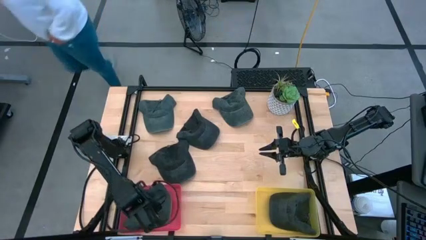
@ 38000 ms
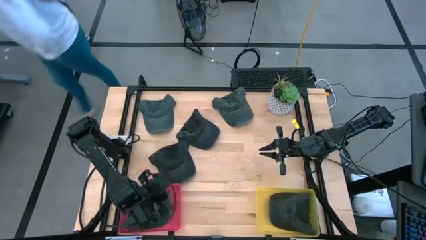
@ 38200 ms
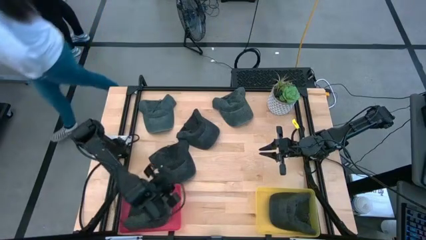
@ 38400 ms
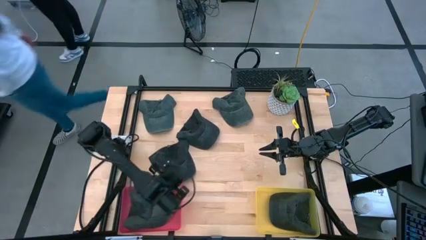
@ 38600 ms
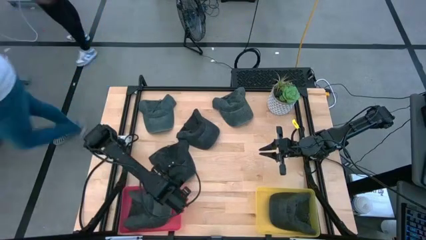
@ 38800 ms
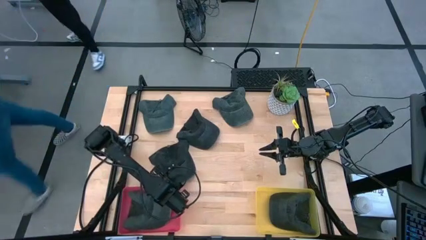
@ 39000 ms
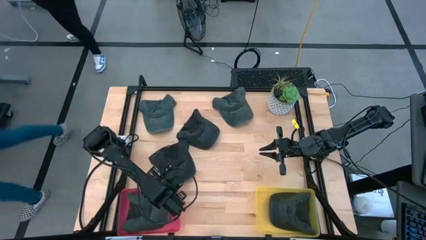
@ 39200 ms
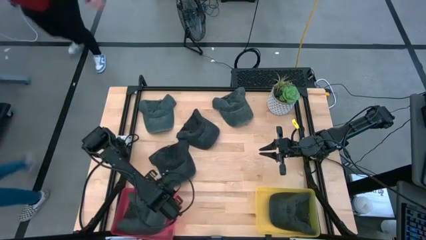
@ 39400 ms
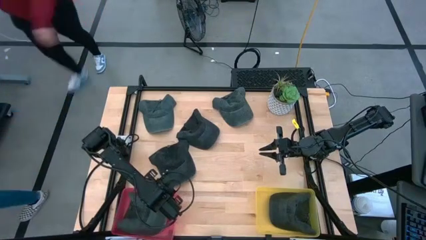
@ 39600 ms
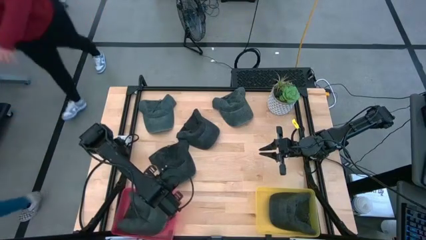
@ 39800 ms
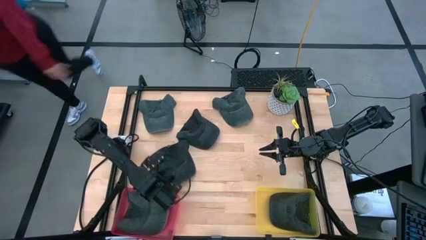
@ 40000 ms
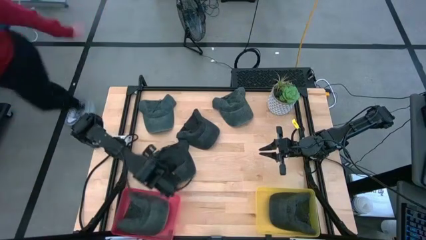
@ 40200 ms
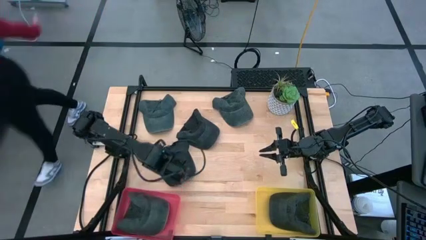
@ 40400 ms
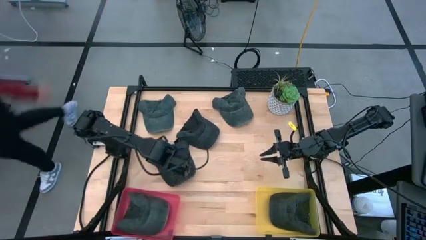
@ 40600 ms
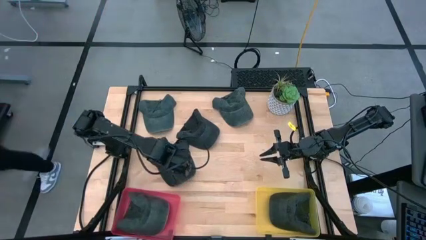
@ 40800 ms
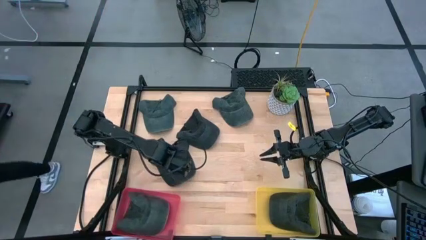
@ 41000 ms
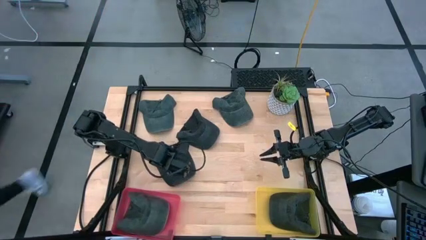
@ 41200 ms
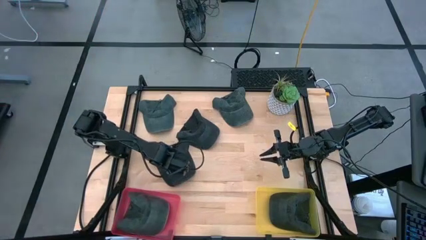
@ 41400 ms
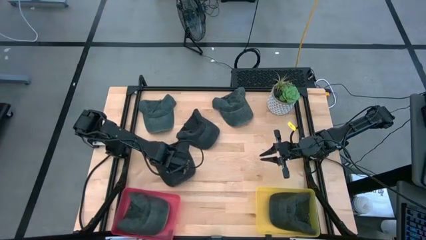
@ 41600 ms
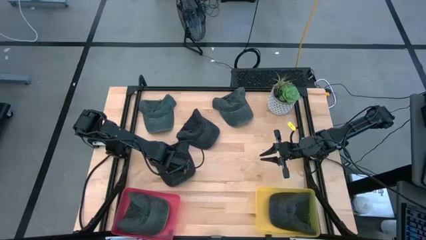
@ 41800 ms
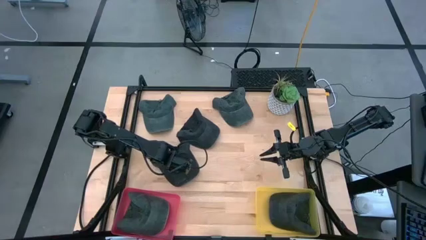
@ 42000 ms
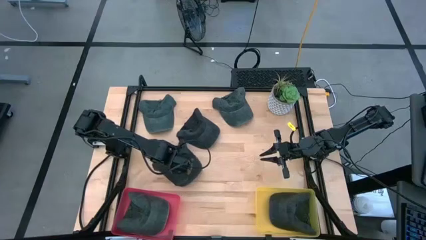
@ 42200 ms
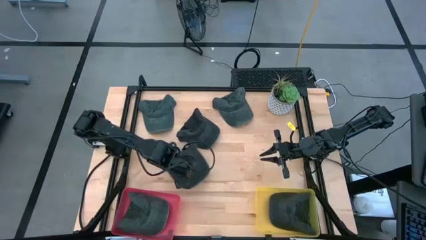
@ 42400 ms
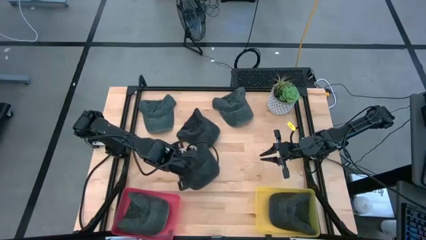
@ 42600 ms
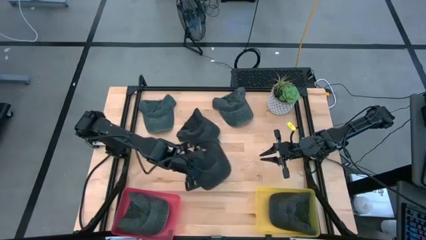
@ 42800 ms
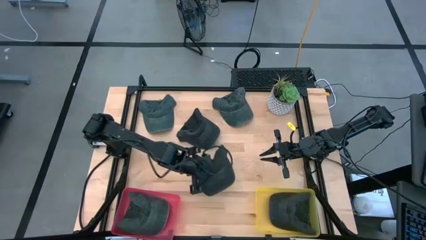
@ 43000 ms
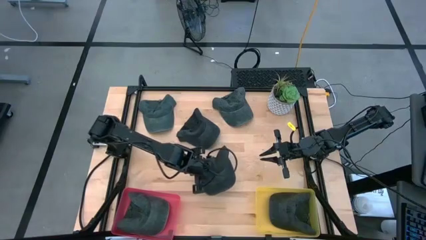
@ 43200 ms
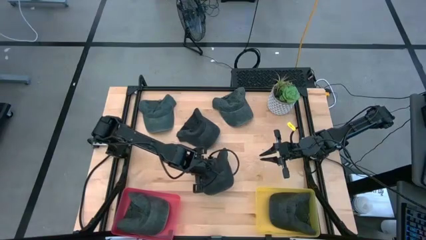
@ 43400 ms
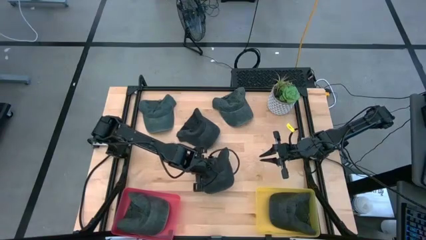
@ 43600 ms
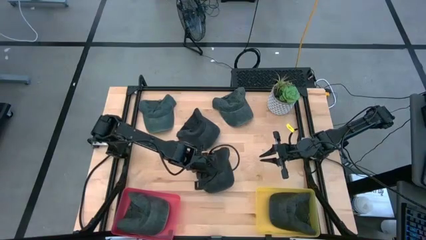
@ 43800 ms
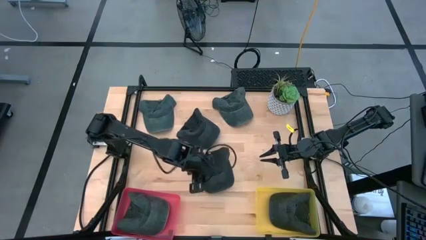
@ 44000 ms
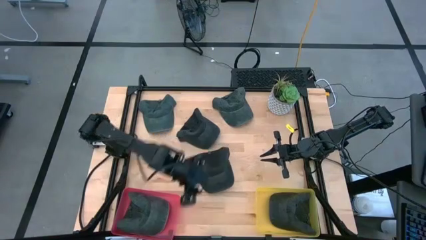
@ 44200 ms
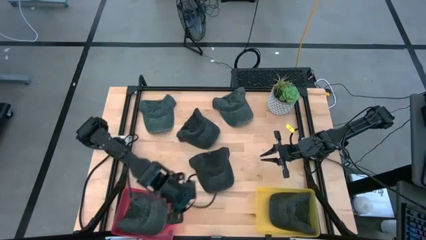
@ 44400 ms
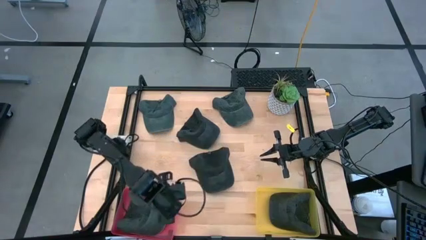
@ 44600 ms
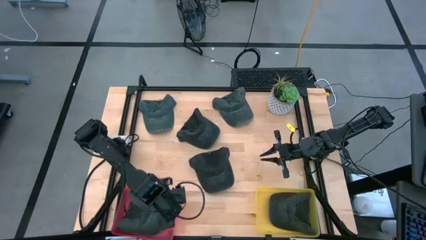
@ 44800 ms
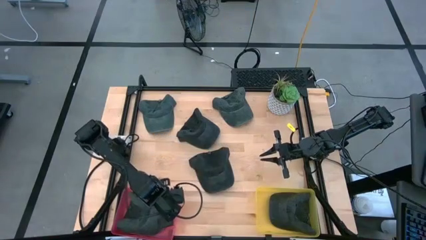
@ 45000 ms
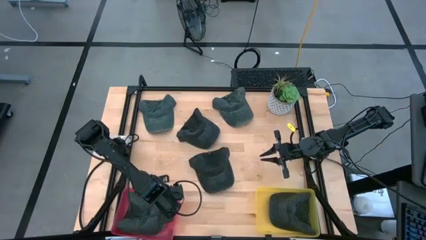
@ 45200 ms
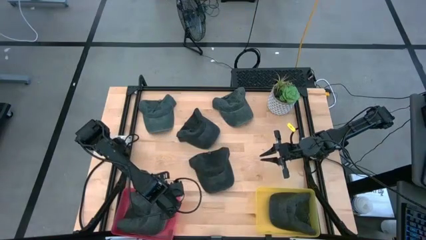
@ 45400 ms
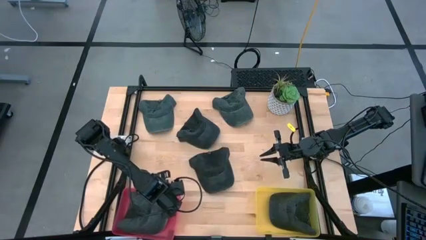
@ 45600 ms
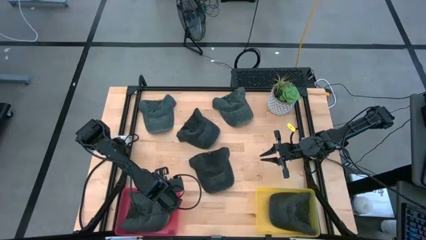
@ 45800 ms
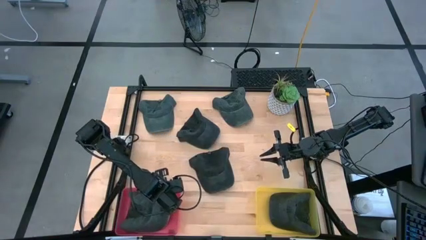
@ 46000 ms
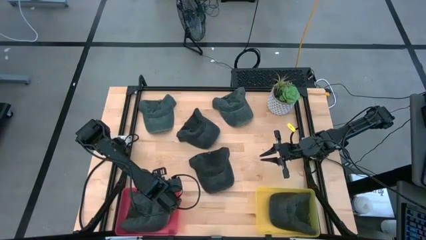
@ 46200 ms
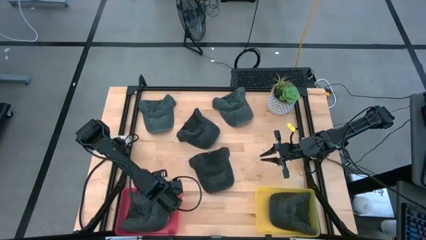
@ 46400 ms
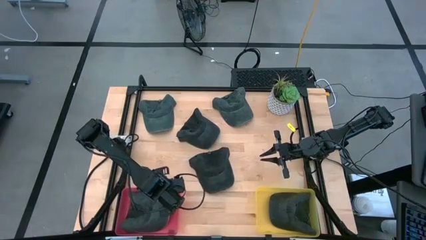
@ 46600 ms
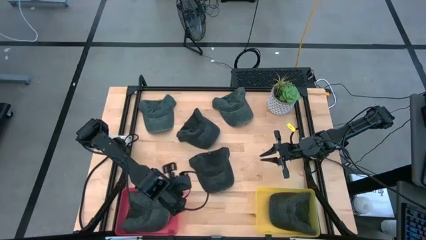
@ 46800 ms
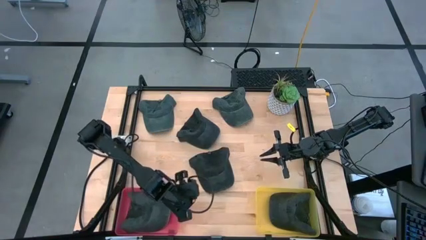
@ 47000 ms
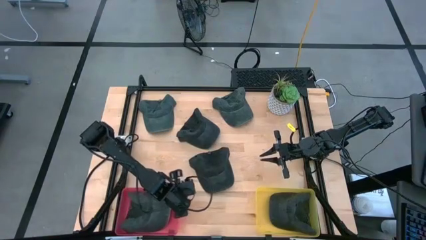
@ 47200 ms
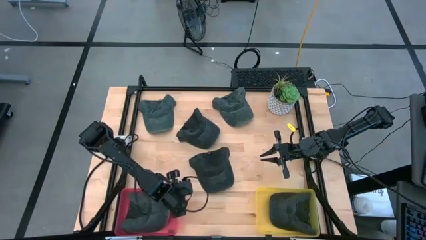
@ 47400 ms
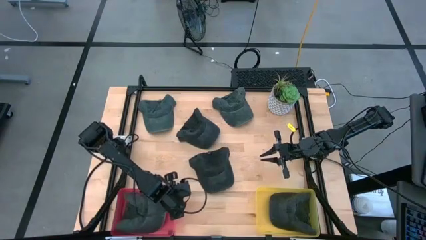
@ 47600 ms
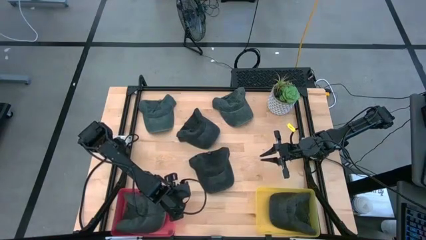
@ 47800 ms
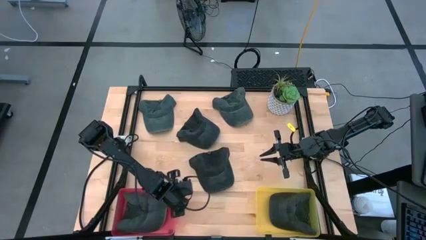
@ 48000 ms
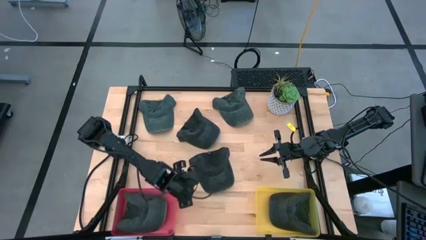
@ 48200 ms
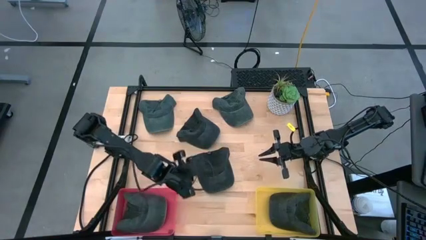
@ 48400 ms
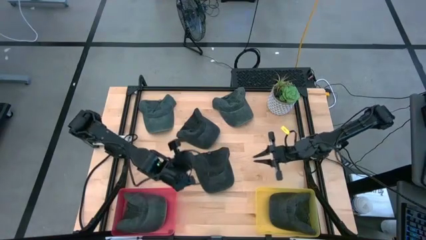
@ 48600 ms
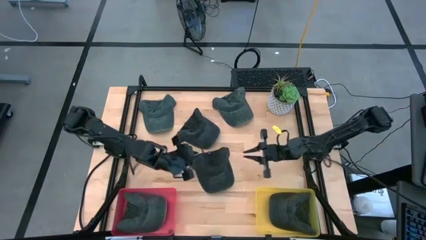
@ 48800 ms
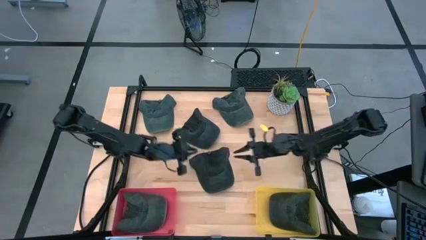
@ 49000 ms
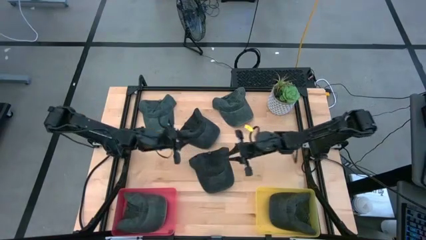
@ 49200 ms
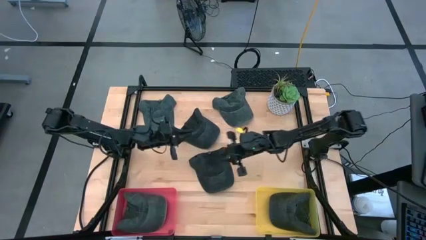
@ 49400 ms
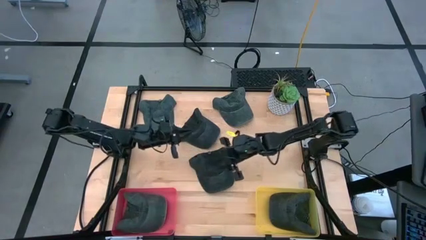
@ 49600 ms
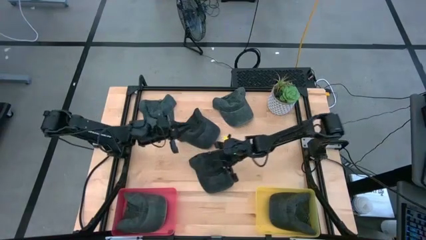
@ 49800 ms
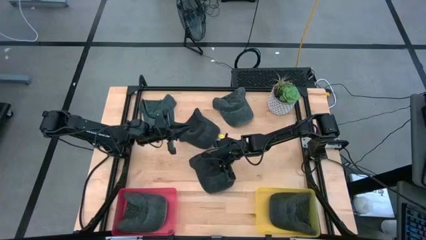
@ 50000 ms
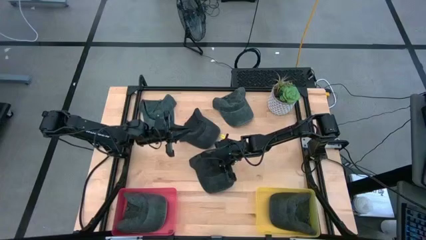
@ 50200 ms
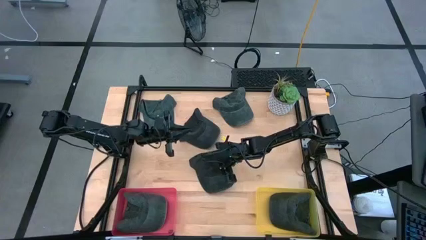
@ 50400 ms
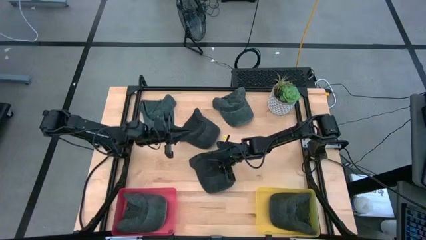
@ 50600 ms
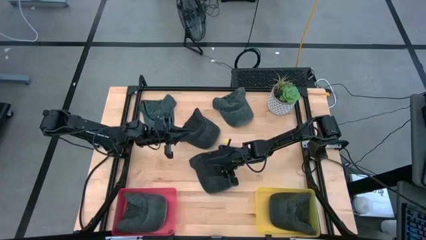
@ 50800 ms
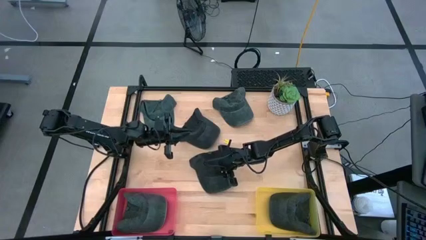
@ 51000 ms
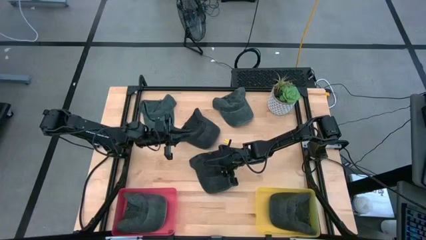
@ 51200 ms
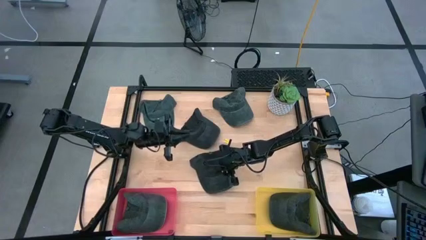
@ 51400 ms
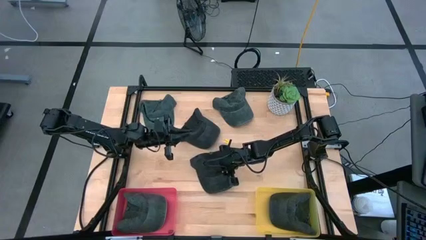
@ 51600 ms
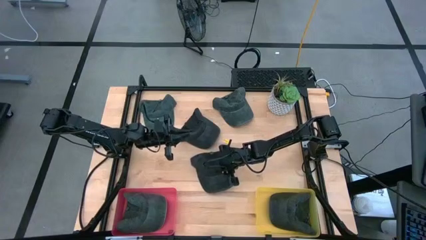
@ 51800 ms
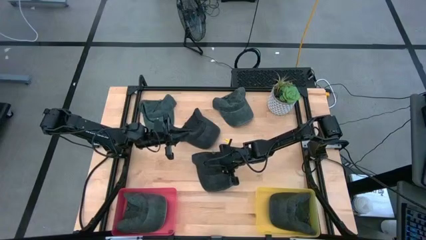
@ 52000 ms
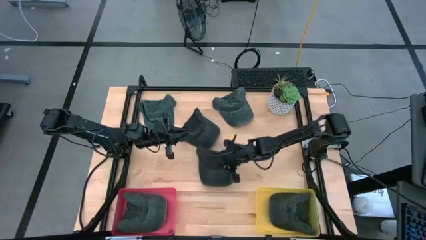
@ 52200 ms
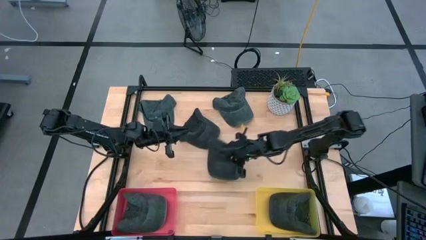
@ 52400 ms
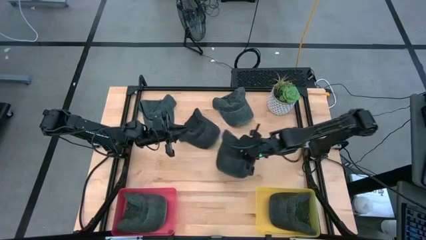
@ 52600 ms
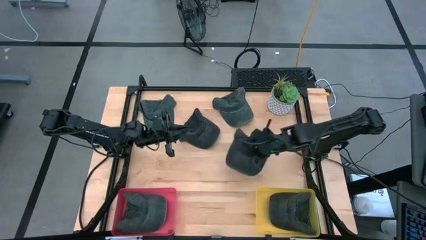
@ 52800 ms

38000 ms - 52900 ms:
Task: Pick & Place hat
Put the black cap into the yellow bin

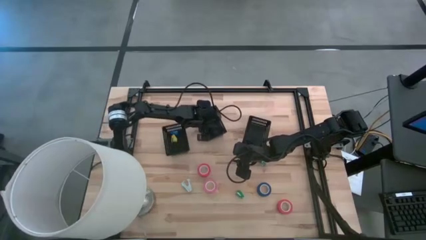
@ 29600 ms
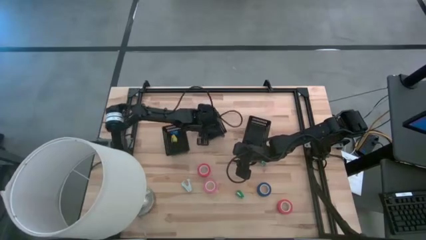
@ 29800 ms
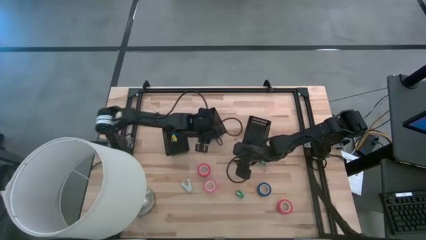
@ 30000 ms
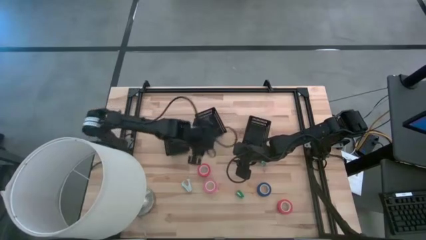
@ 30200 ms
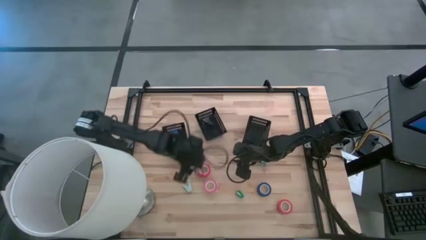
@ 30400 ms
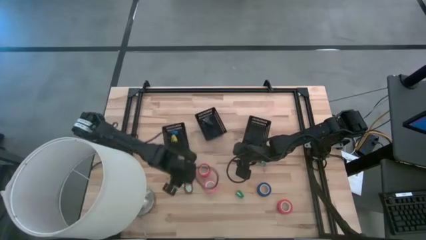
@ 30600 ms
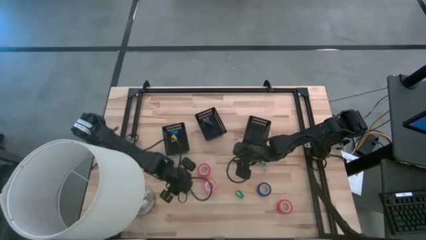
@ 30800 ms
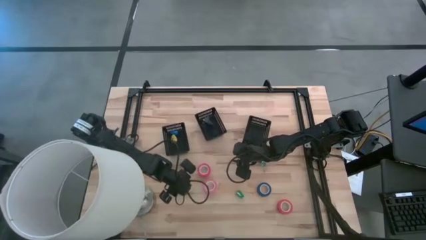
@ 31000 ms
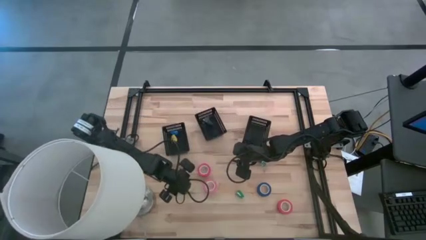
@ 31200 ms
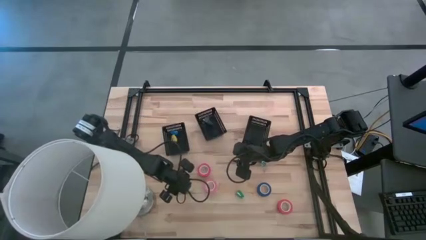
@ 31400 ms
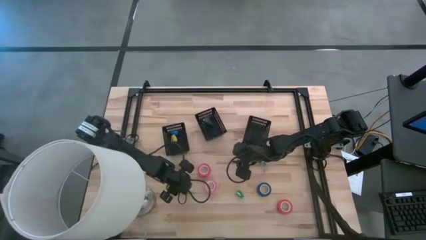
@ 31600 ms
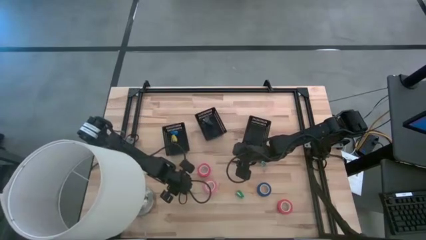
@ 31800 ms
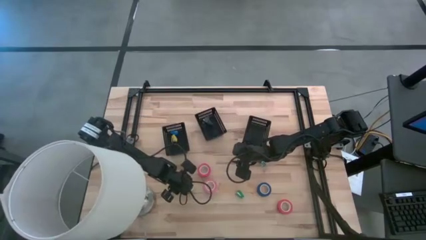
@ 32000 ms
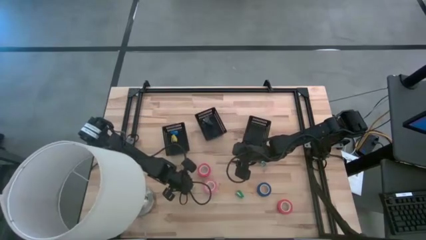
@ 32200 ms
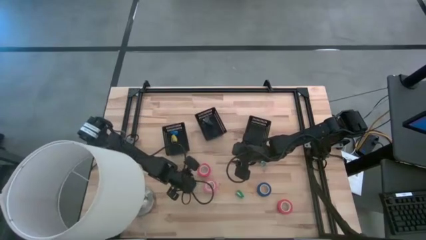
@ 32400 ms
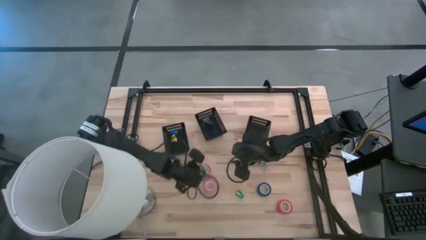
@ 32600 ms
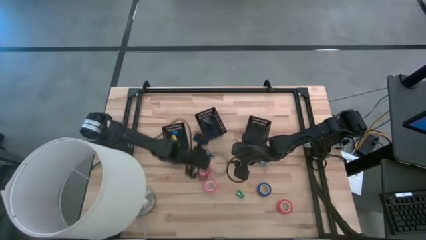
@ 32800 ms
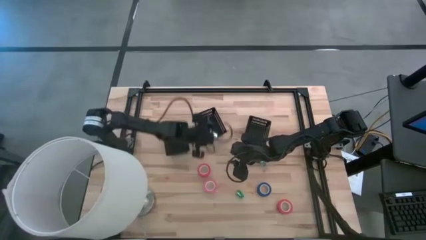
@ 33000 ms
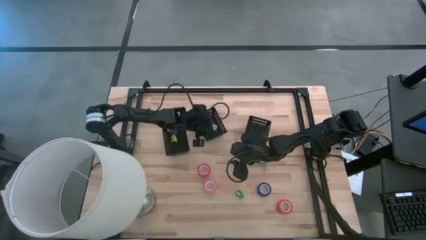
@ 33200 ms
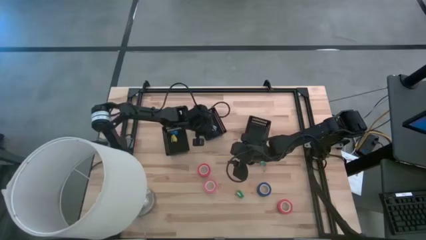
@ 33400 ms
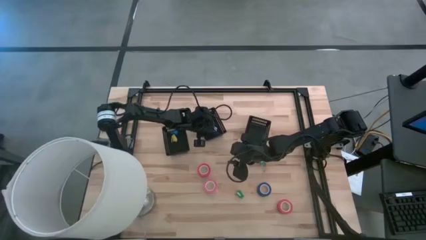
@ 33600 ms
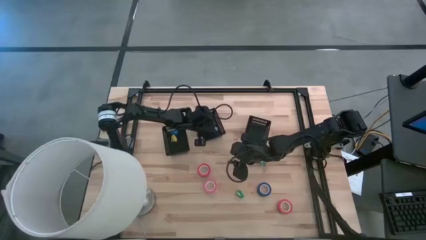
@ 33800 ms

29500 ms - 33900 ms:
Task: Pick and place Stapler, Stapler remover, tape
Put the left light blue staple remover into the center black bin
